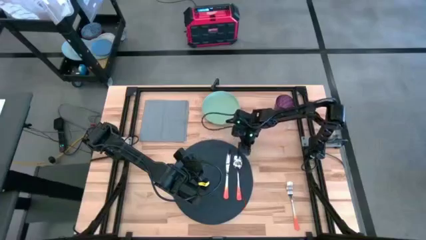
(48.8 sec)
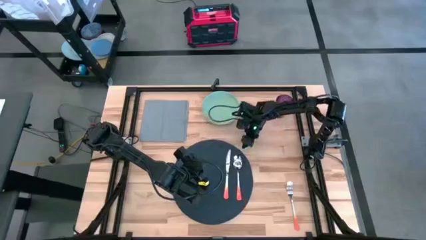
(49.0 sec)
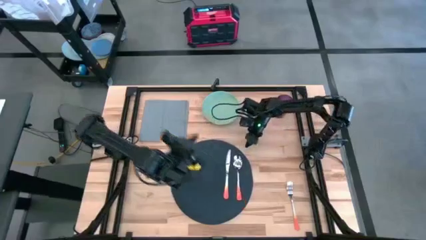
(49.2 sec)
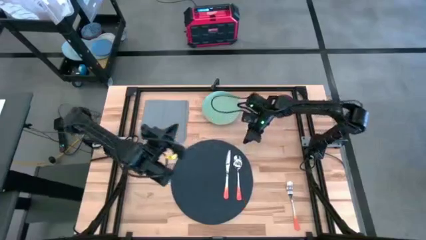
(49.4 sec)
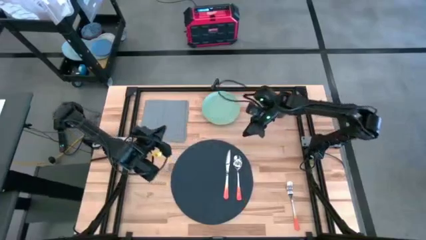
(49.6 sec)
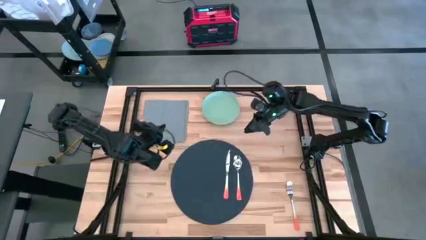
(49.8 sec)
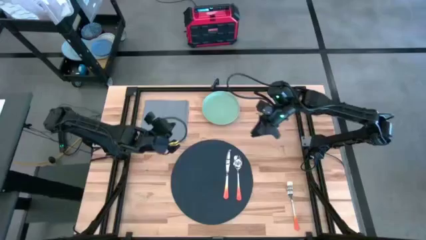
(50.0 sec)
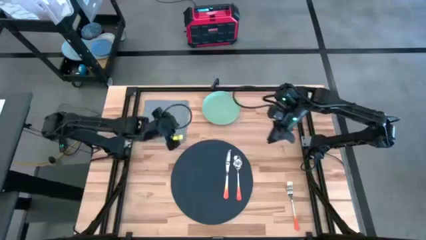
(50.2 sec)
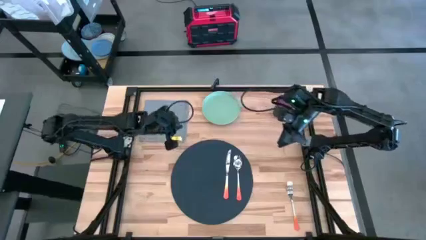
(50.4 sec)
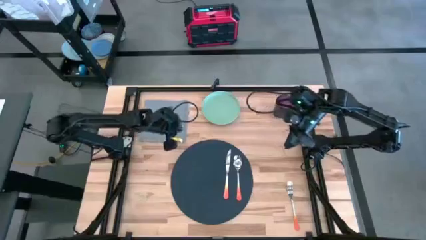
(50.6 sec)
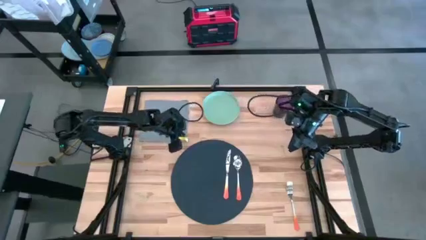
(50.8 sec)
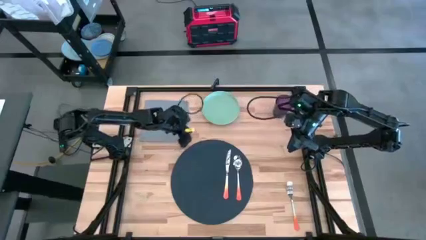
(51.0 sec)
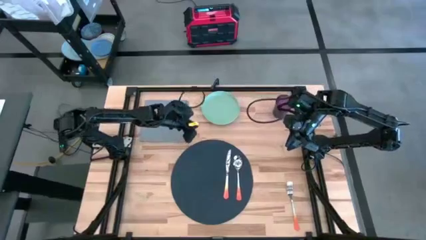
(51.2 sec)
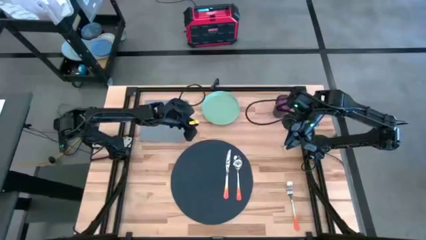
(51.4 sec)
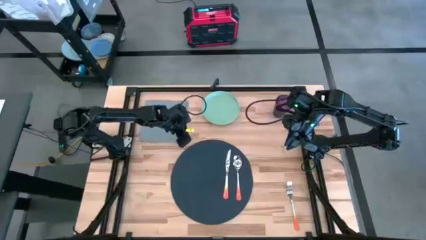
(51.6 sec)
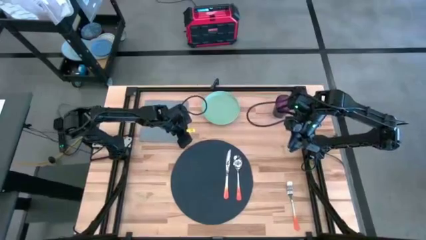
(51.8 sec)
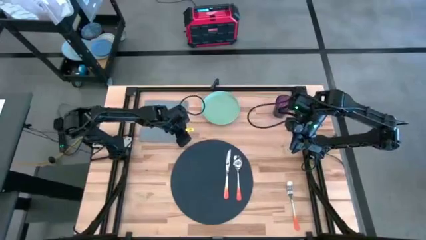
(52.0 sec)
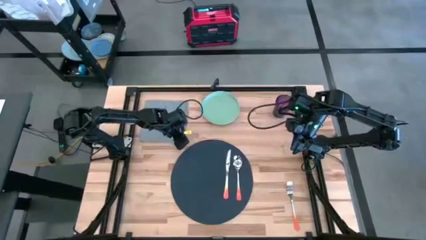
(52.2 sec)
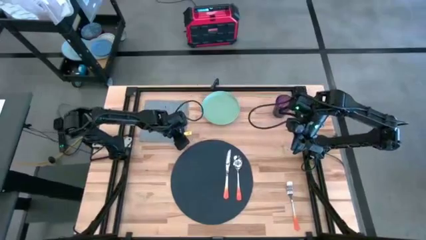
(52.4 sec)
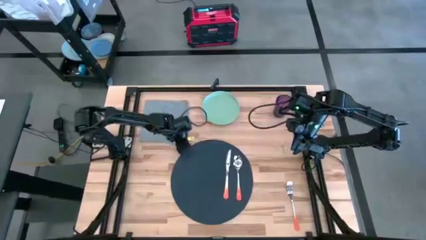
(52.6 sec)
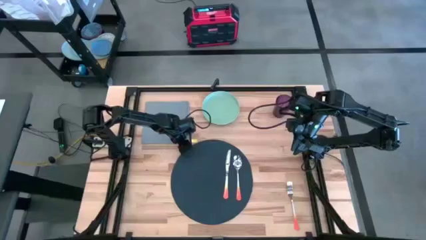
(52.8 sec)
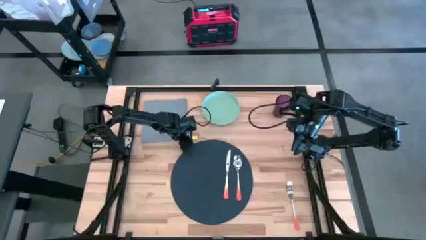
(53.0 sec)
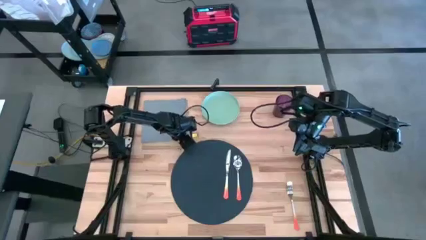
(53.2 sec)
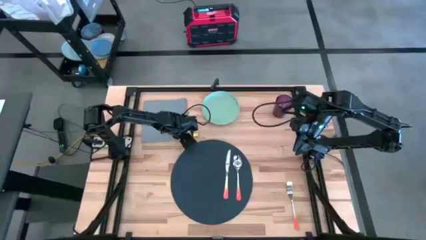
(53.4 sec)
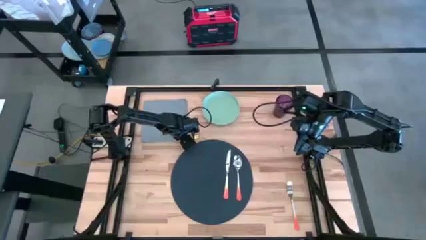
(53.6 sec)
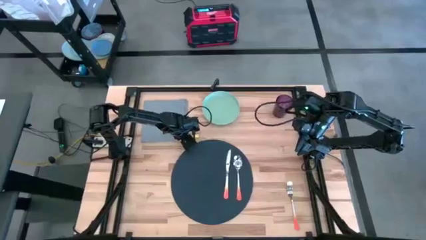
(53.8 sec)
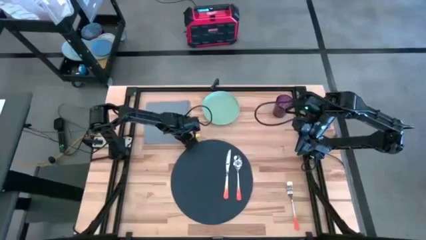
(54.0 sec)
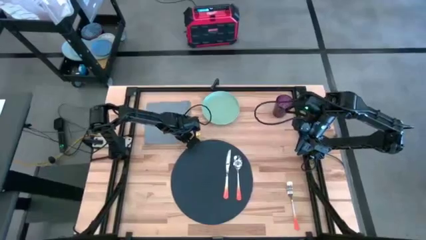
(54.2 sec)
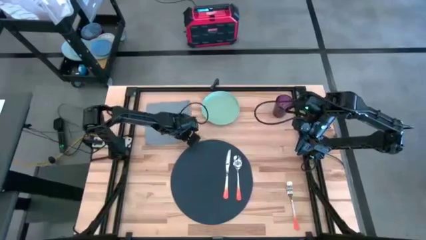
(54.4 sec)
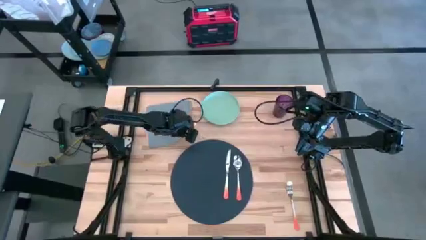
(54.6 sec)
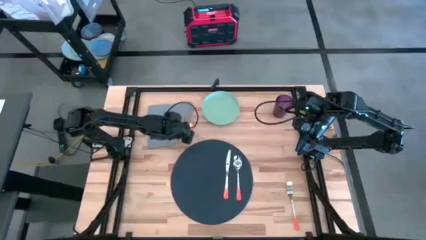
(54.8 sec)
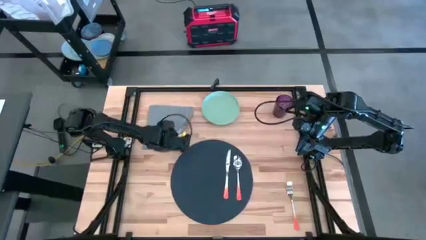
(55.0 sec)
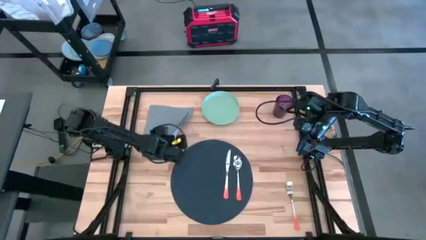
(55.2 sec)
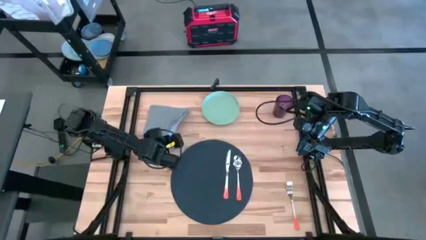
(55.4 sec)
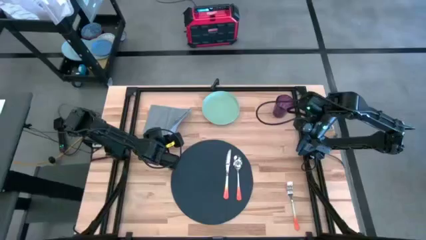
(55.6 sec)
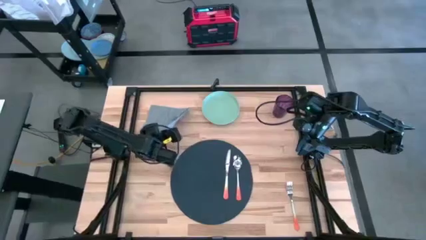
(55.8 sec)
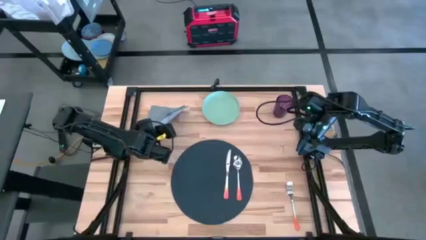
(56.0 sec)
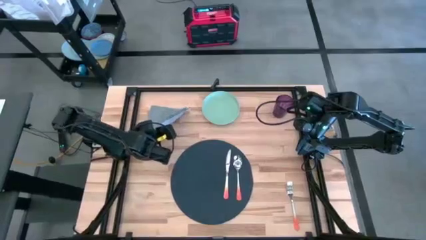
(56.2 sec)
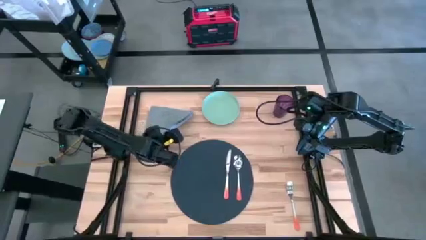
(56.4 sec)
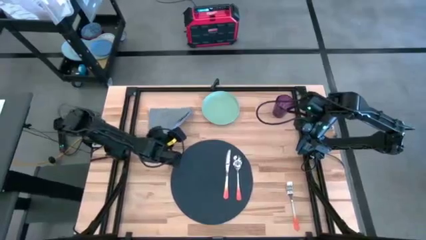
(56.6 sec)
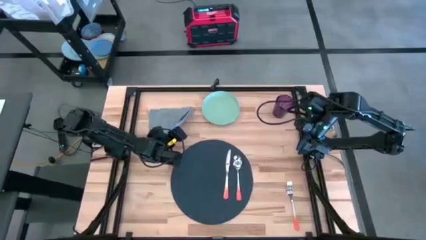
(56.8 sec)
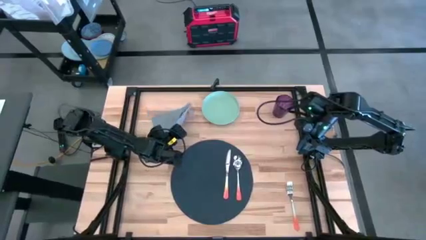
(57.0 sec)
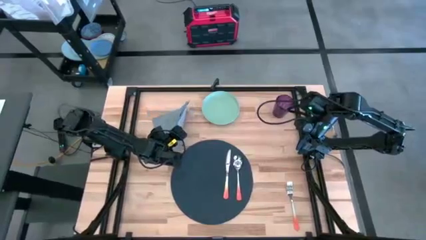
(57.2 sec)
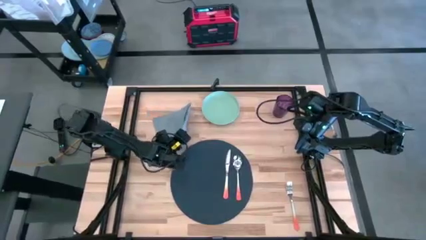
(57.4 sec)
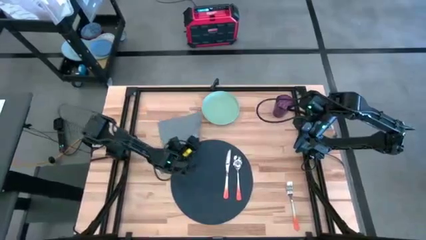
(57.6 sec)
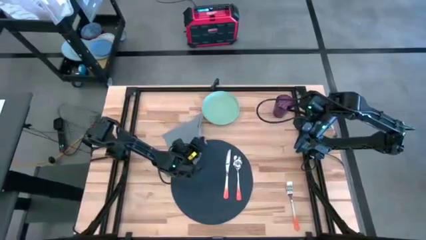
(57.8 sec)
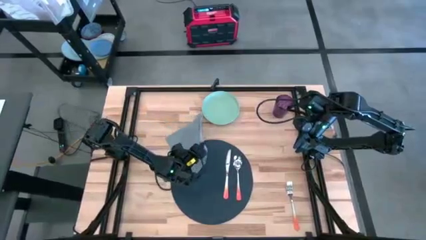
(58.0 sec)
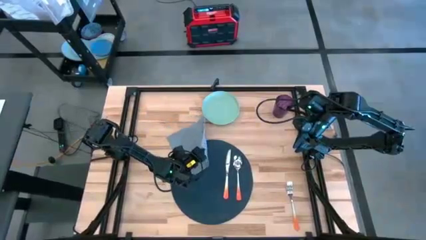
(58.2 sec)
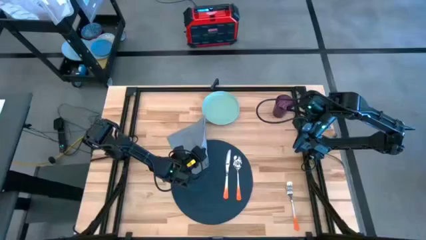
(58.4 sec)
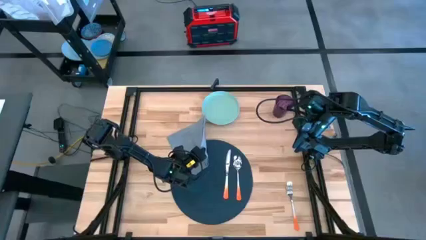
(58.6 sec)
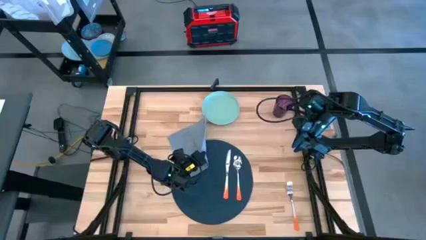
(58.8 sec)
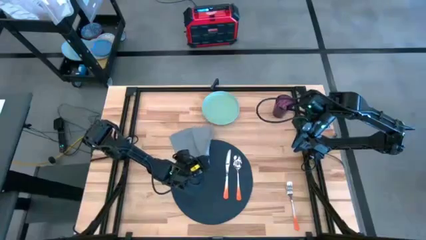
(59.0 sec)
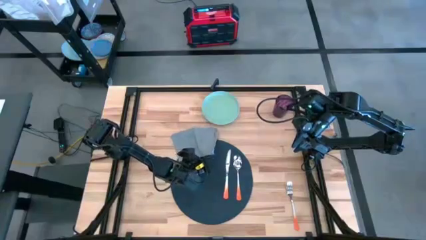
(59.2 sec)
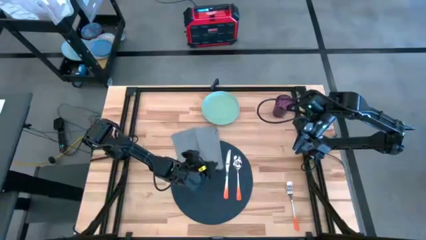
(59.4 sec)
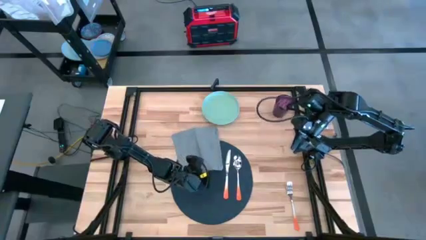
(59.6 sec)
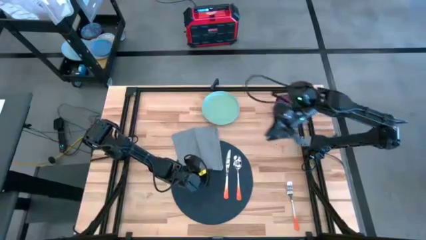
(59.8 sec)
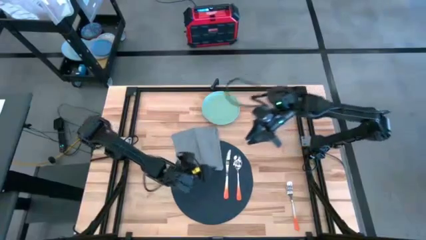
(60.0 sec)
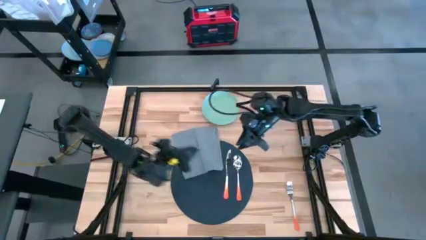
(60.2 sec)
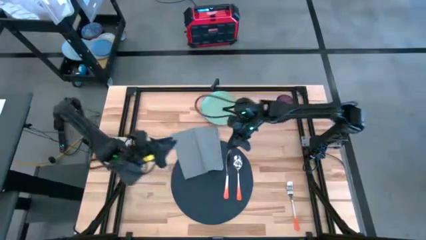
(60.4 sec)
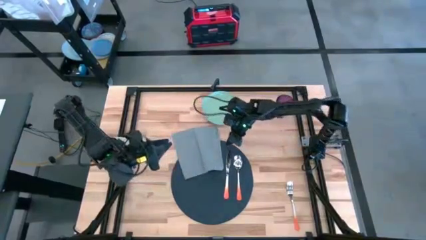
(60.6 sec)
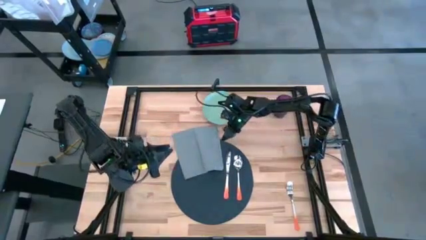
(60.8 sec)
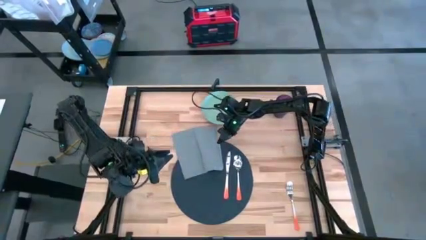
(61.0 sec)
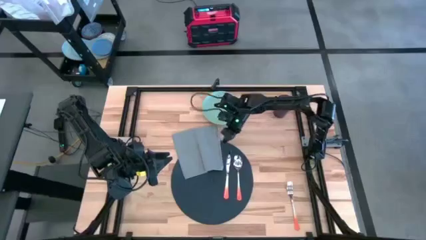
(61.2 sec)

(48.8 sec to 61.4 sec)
Task: Set table place
Fold the gray table napkin
